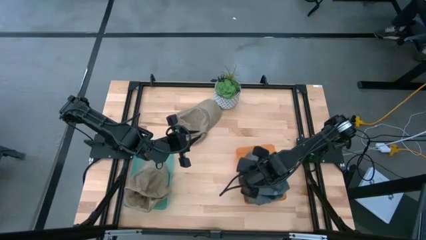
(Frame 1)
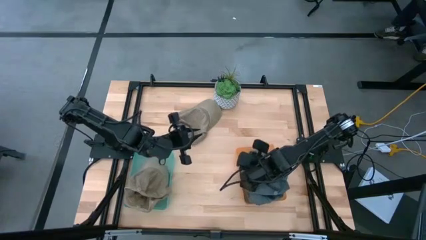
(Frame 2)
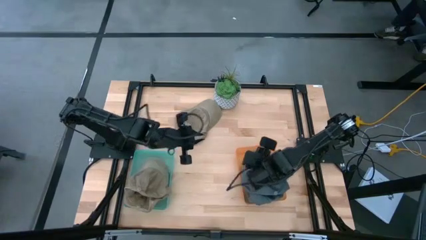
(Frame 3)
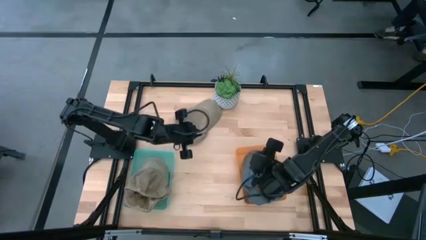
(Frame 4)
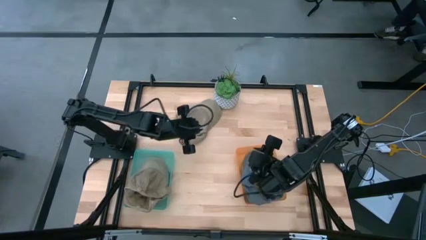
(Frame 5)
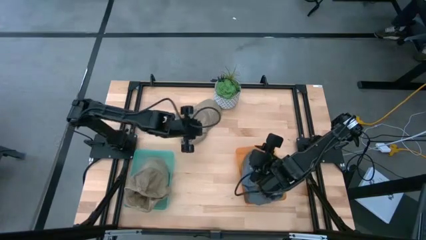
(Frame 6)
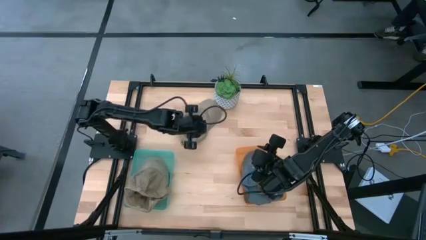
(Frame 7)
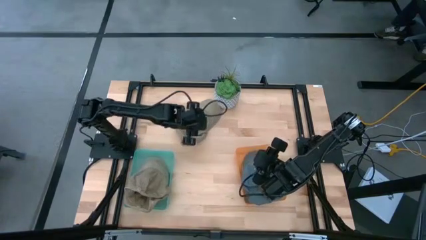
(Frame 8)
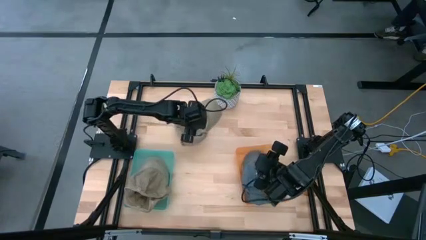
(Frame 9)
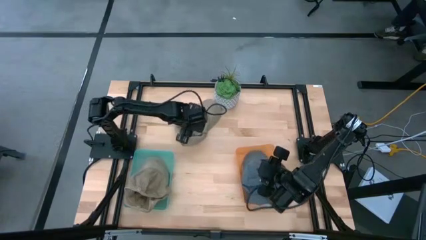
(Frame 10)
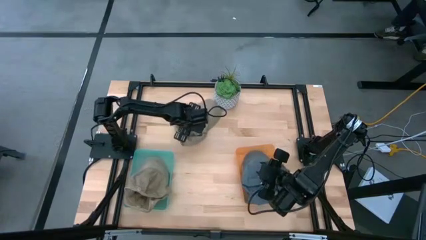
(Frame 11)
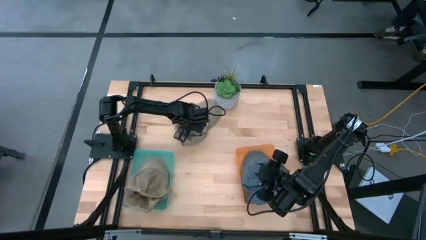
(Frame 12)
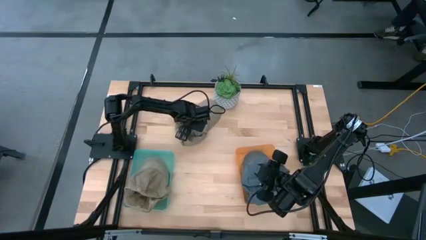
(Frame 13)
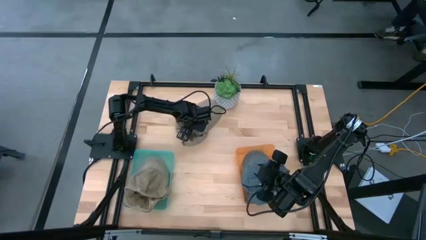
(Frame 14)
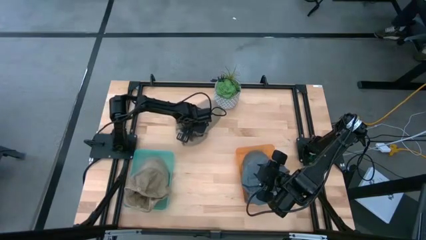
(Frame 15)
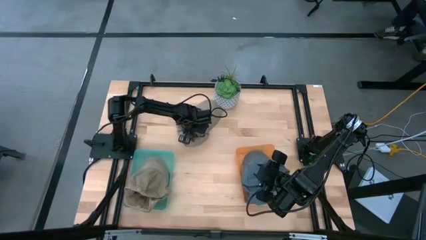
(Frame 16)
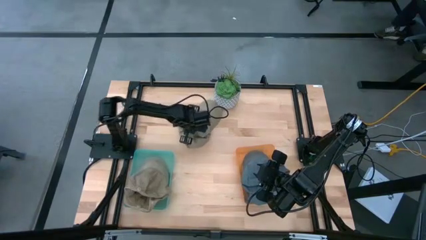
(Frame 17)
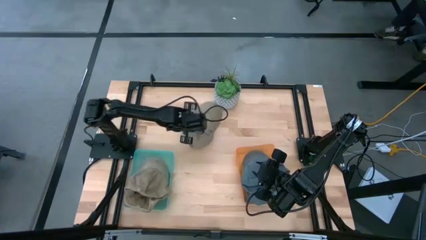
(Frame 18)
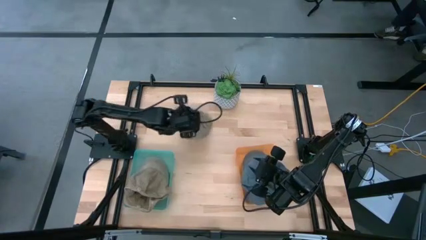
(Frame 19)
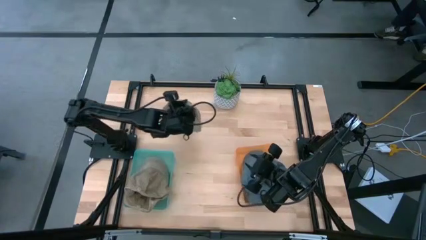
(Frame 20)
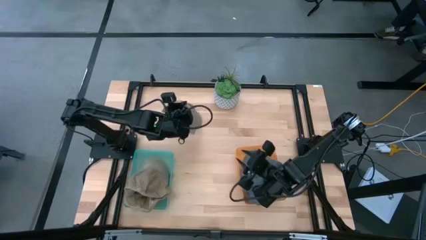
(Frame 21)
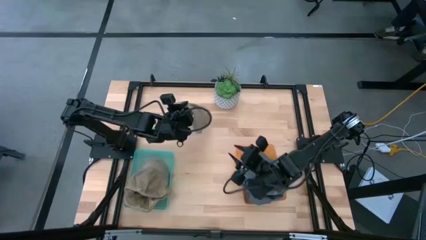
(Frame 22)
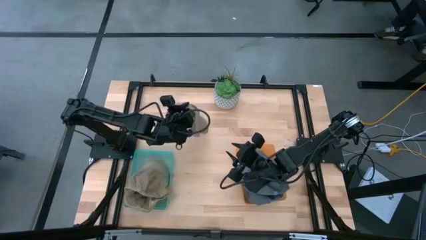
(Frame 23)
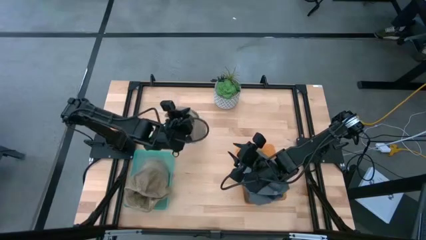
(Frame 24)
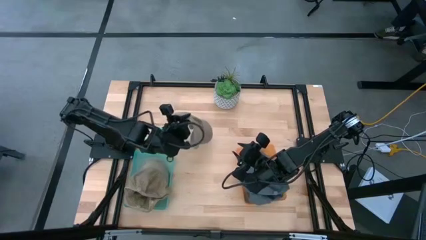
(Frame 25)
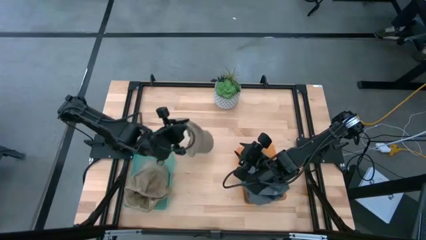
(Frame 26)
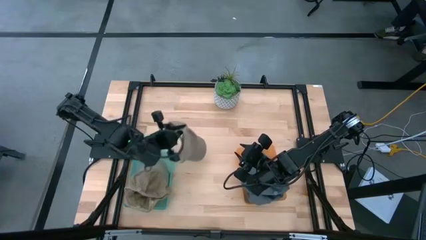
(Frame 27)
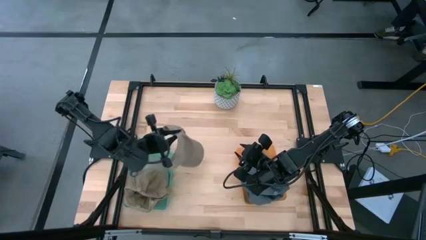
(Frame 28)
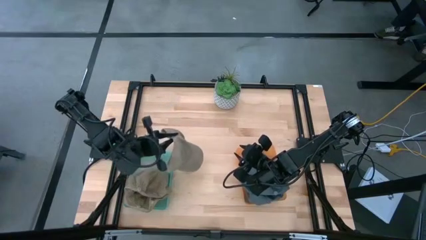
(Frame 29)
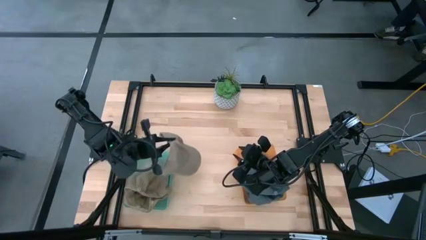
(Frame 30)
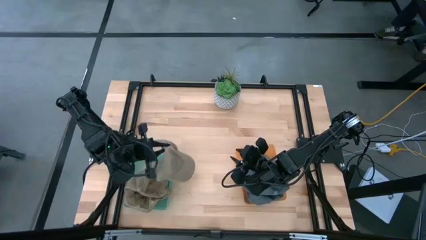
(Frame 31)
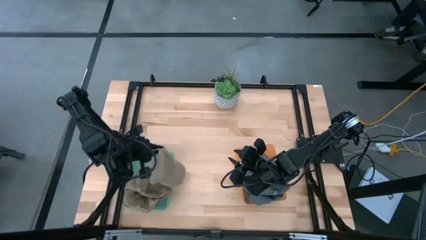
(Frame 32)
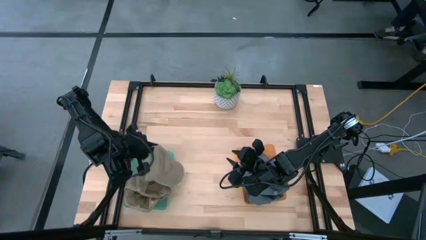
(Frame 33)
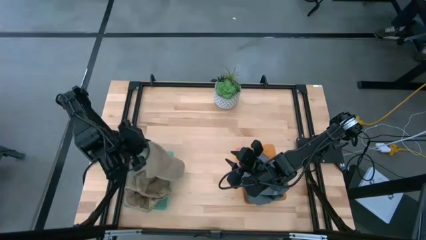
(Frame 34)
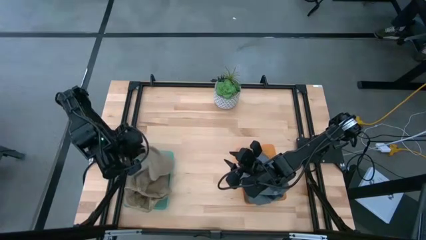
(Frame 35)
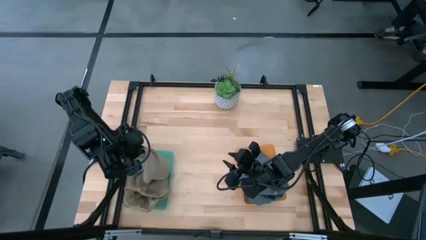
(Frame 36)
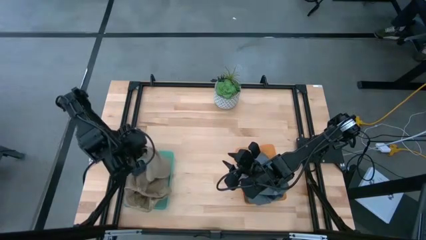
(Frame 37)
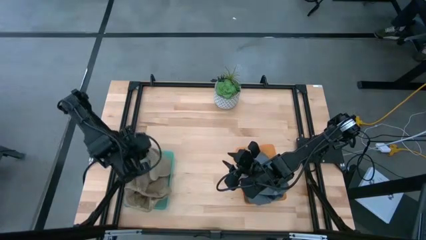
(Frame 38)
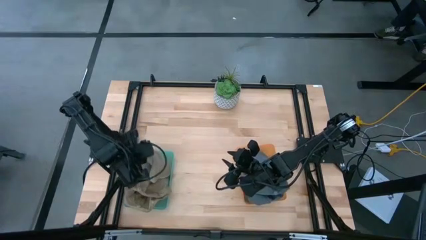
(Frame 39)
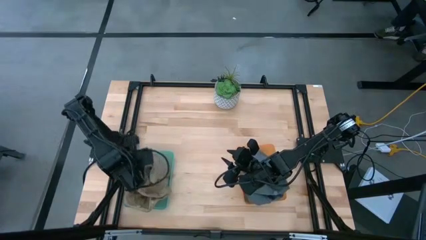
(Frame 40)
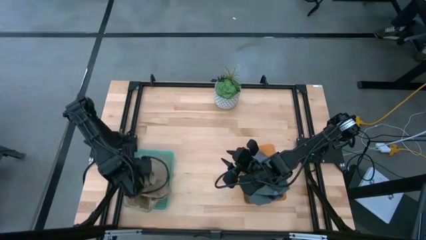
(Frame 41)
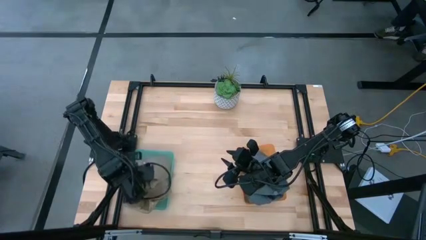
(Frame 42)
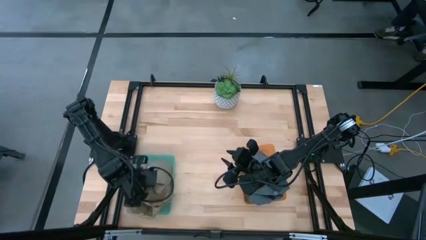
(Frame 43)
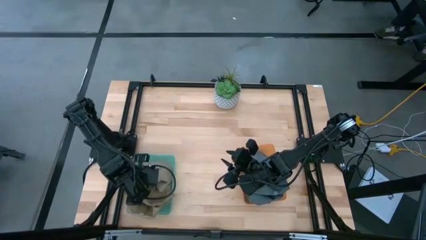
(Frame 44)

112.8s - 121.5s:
Task: Pick & Place hat
Put the brown cap into the blue bin

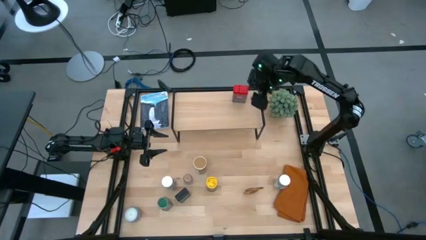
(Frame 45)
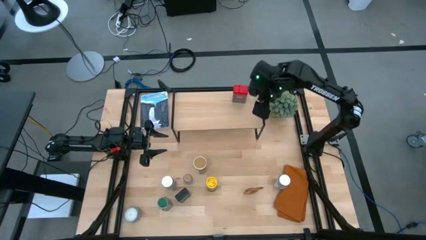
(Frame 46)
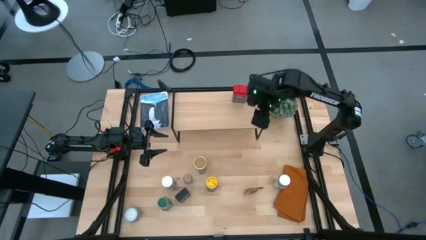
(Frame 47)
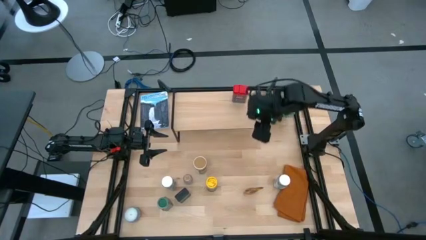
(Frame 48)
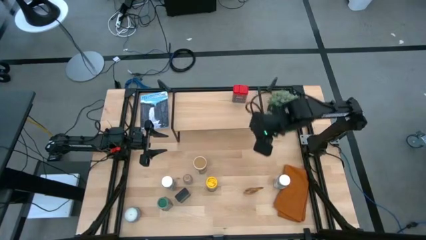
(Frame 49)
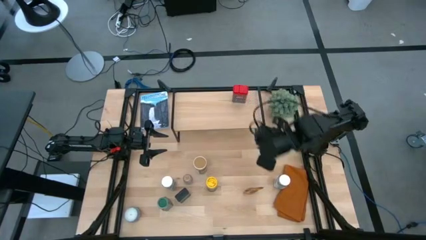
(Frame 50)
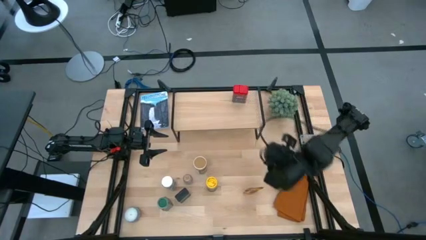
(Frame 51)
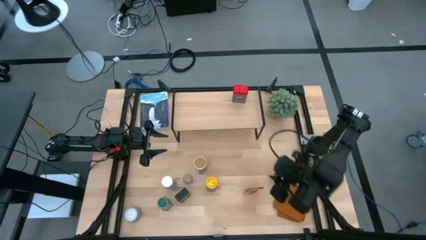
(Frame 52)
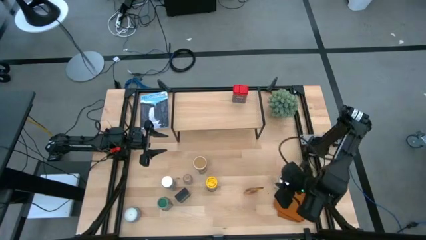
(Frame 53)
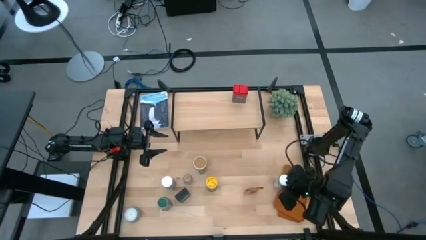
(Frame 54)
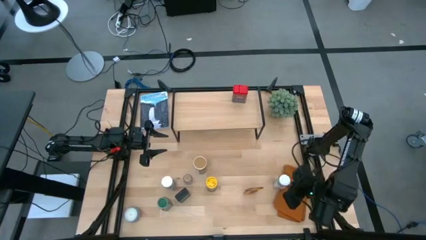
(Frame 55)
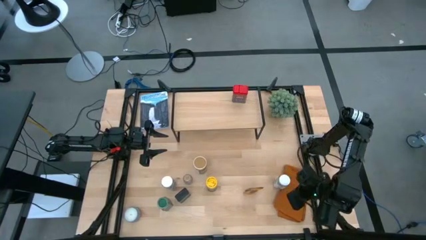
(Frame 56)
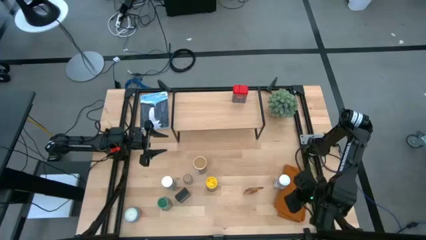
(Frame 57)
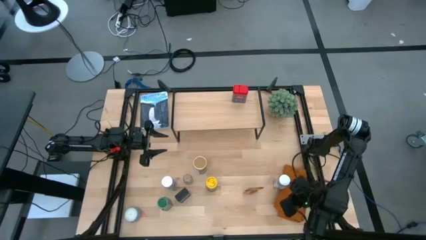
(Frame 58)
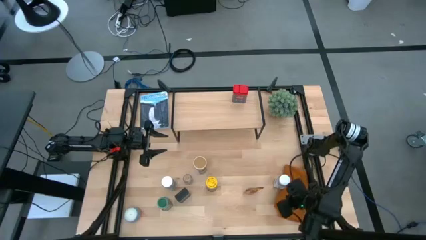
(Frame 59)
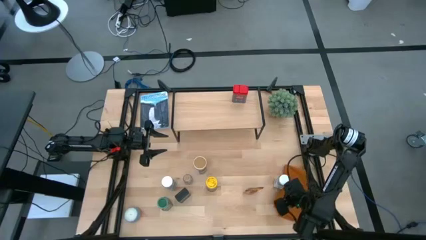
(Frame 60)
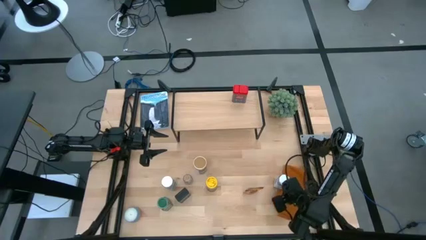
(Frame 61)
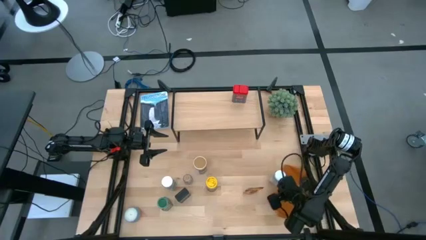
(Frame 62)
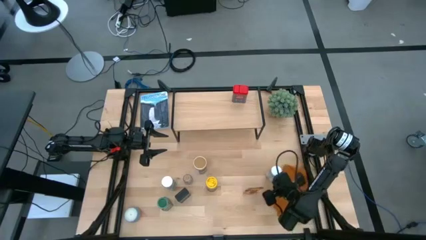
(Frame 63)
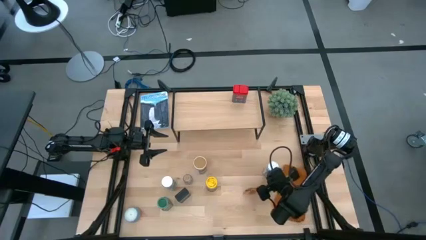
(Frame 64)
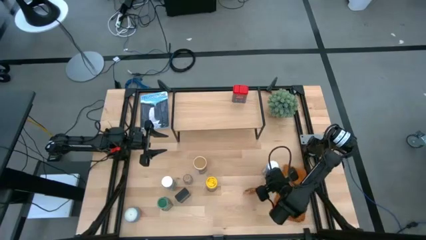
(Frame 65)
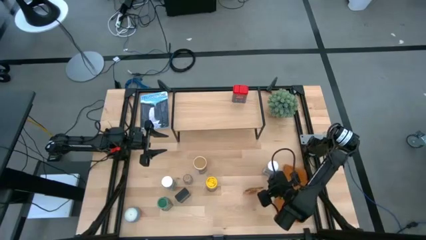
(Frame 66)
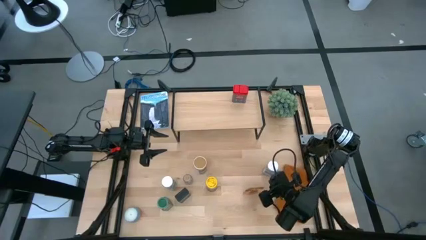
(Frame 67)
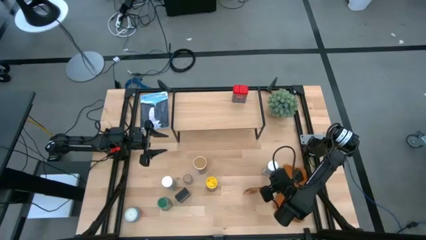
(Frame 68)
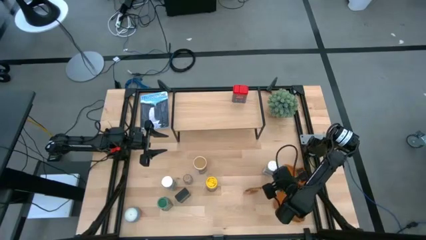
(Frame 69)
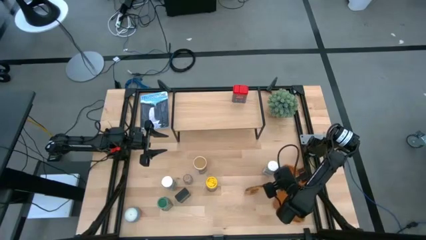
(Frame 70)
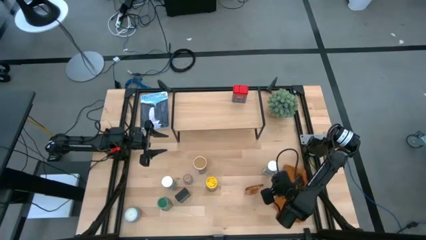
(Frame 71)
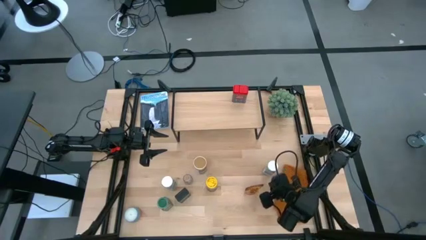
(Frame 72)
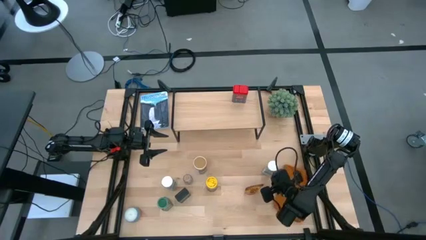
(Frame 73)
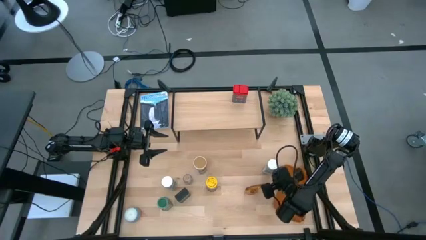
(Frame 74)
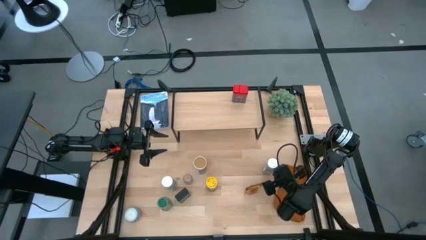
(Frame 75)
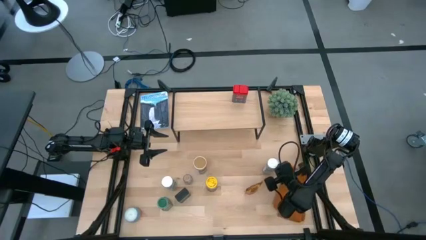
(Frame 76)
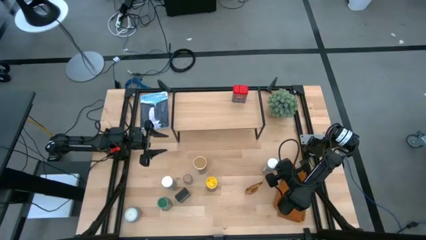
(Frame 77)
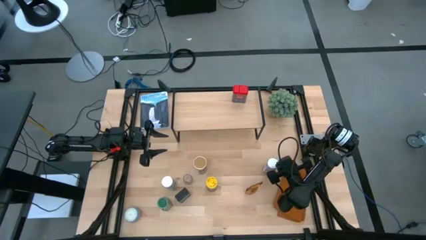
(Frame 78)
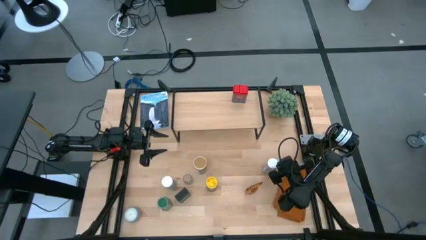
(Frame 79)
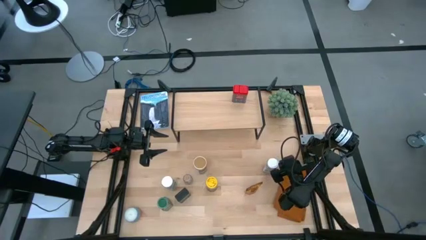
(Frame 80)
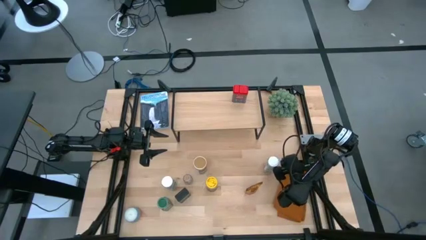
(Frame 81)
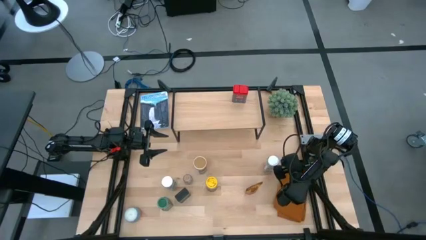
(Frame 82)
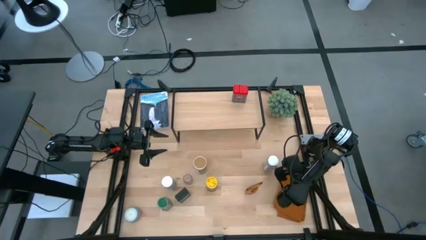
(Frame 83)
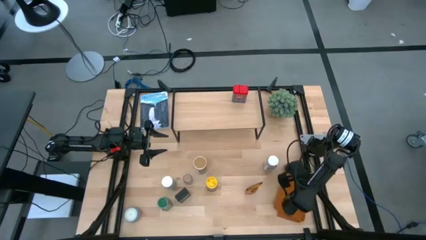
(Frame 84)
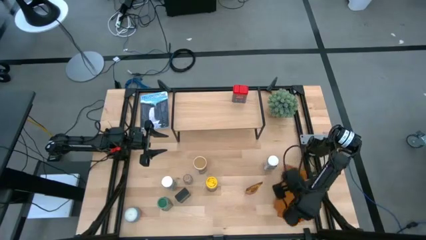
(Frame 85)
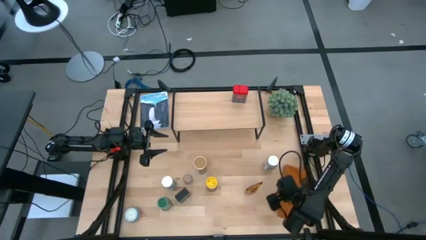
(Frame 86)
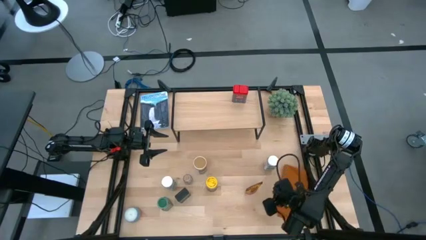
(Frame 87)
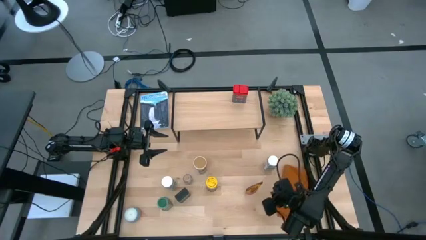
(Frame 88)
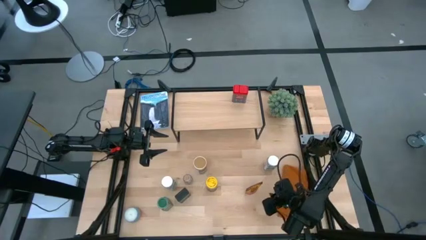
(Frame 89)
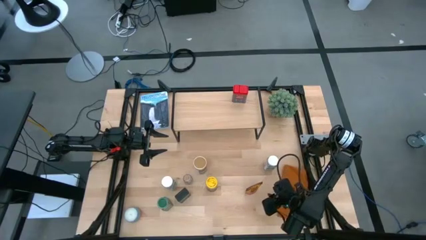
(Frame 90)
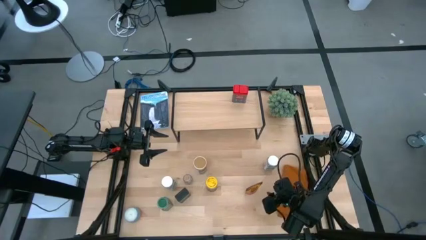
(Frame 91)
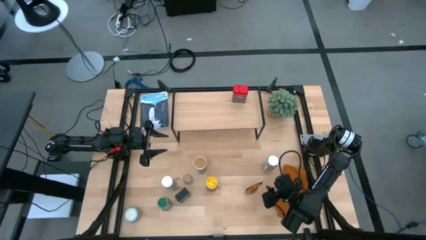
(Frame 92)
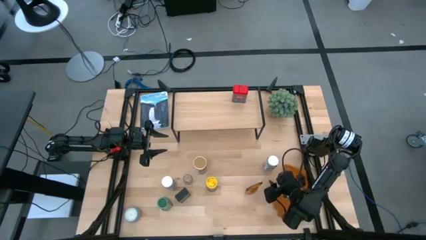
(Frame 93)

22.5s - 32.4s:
Task: Shelf spices
Put the right white seasoning bottle on the shelf aligned with the other red seasoning can
